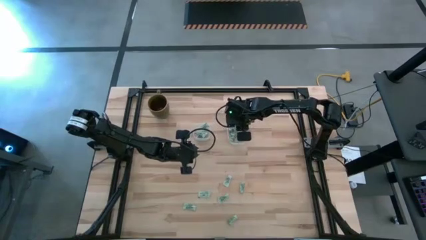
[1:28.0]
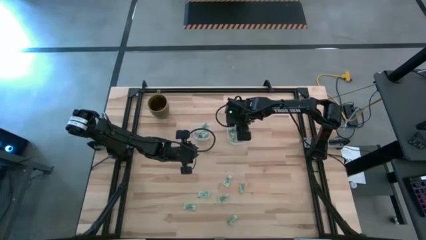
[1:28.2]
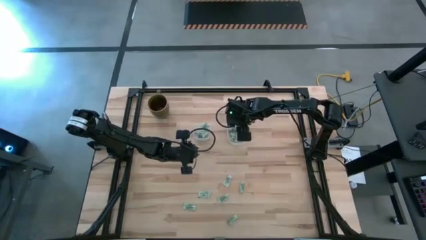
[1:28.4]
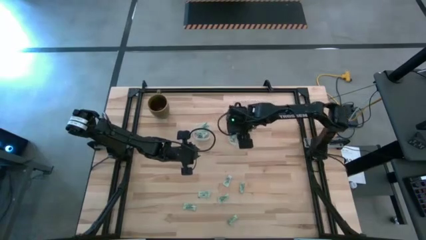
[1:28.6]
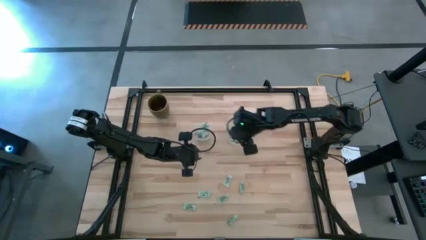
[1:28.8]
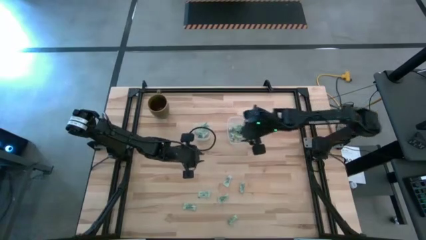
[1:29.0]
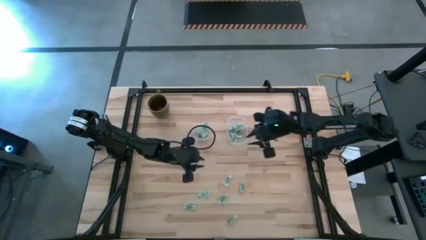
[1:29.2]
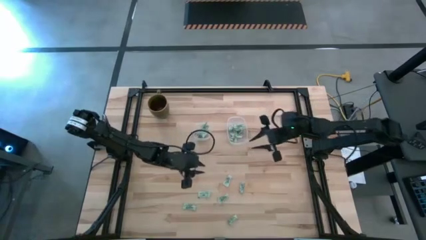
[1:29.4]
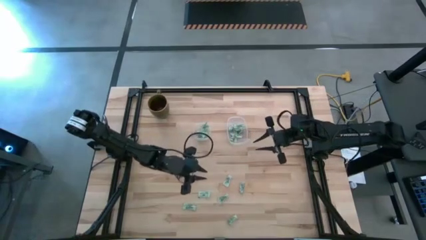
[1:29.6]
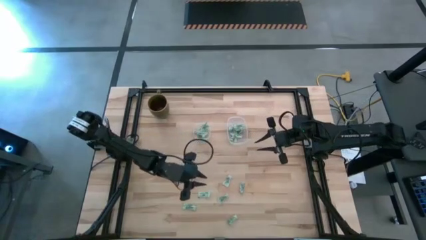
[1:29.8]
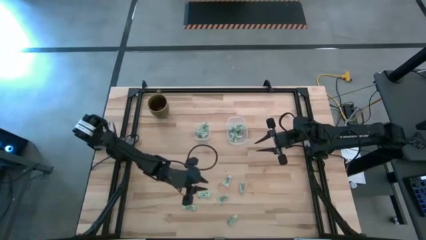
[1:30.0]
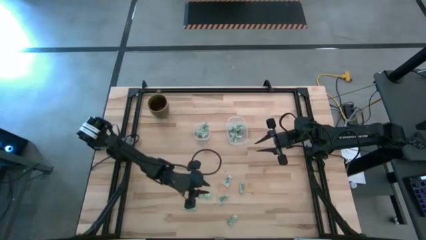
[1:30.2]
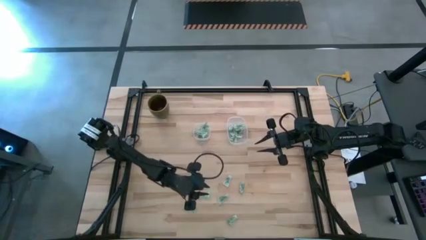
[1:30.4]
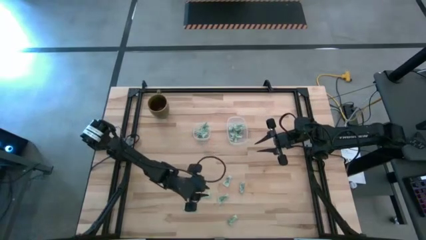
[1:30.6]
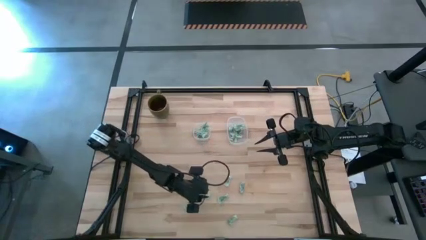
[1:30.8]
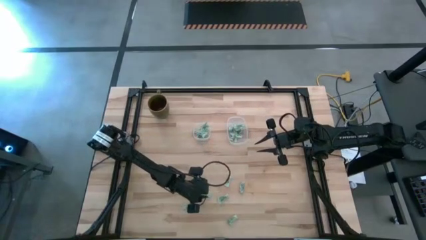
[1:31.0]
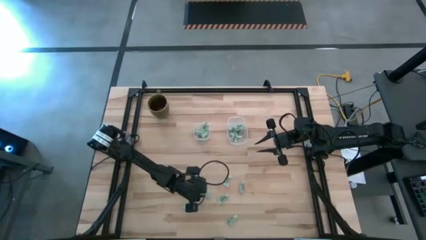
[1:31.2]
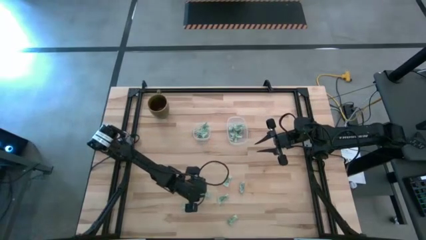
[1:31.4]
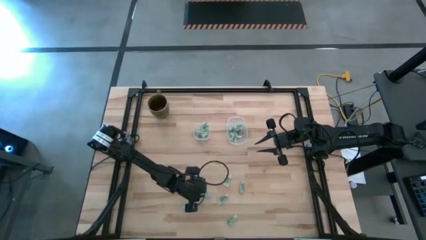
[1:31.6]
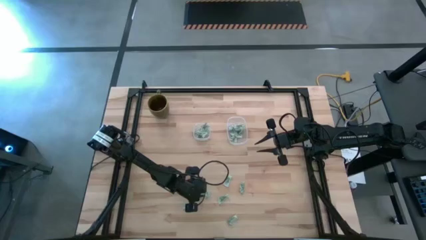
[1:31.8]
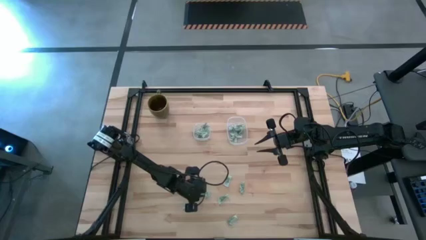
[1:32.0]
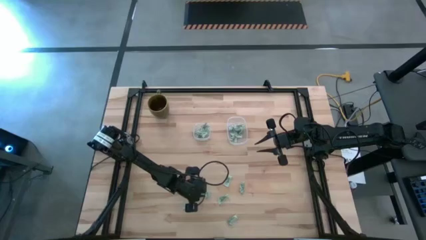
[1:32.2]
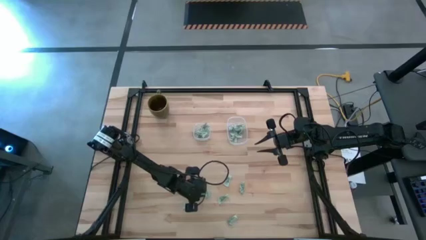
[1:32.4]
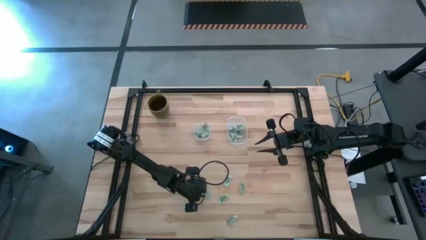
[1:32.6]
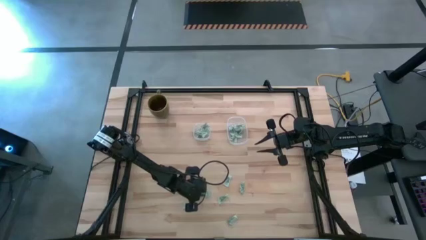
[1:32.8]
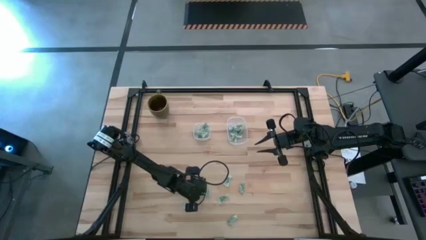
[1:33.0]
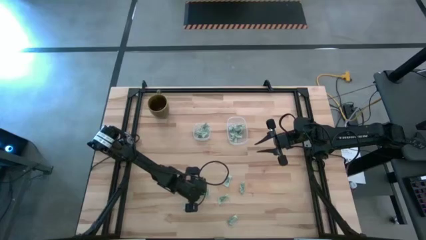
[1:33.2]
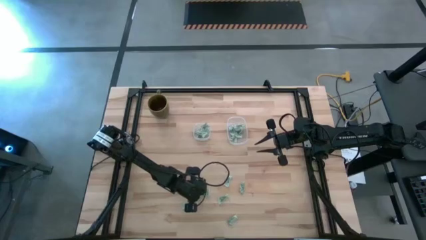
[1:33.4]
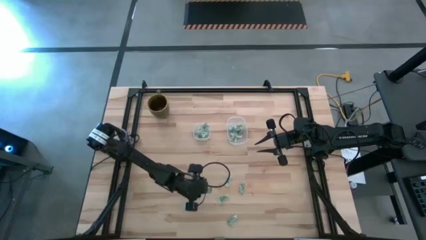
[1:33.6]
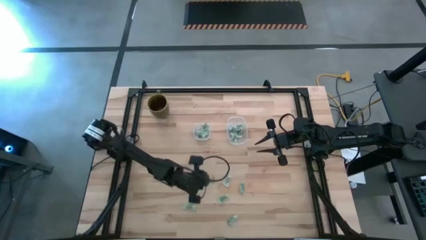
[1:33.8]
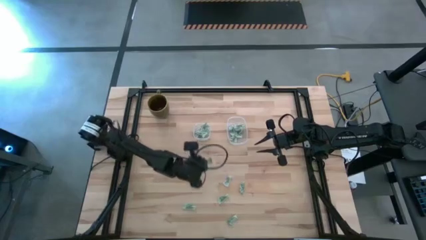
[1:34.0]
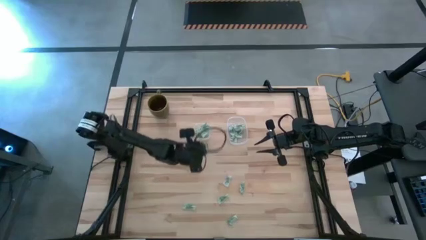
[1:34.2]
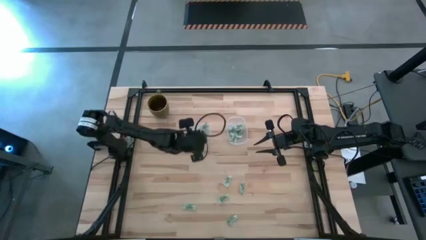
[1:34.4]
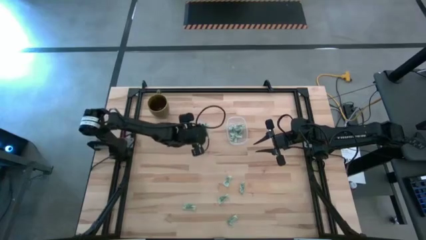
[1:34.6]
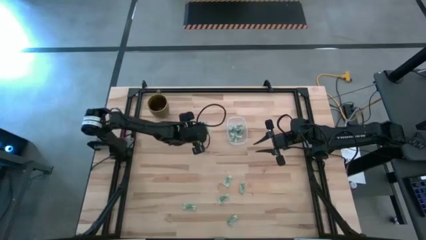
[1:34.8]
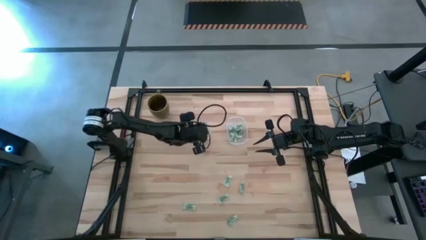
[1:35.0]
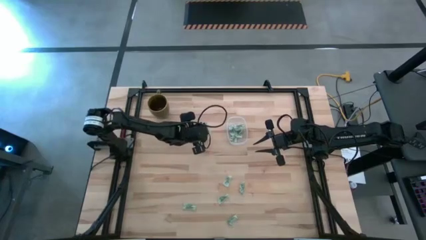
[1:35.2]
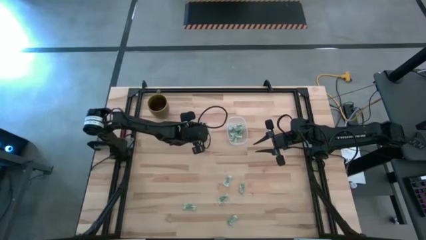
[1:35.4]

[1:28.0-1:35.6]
Task: Pick and place items into bin
Put the light green stevia packet into the left transparent bin

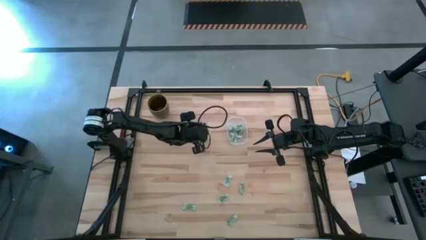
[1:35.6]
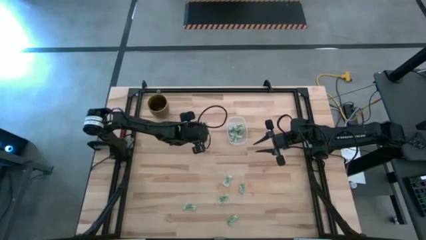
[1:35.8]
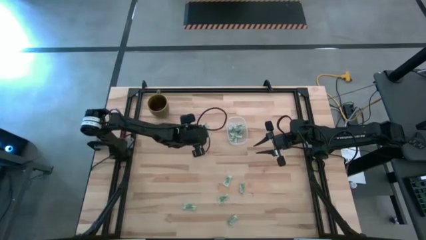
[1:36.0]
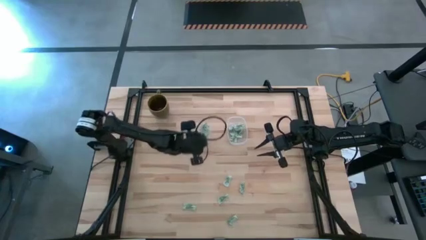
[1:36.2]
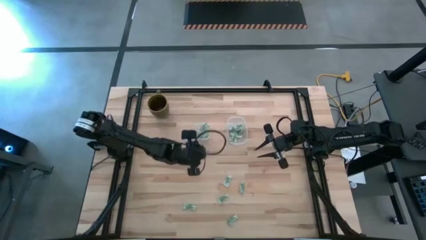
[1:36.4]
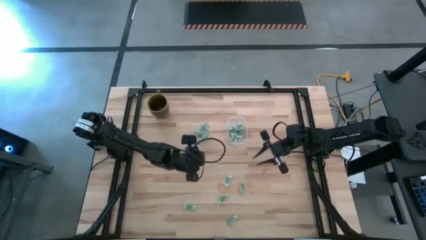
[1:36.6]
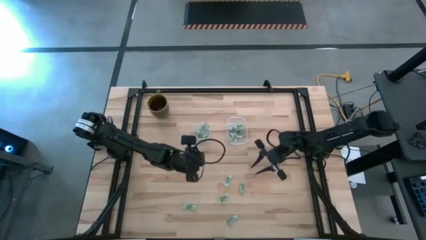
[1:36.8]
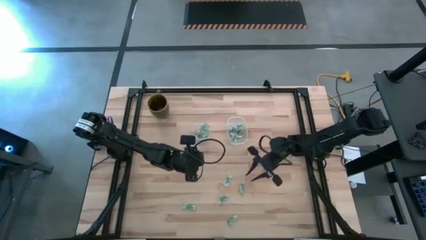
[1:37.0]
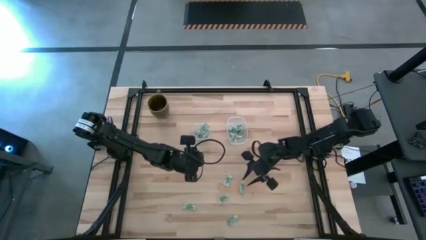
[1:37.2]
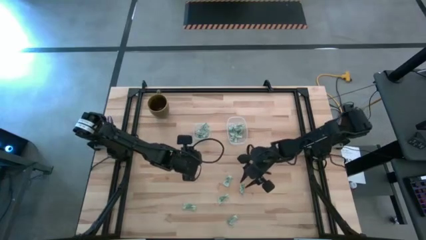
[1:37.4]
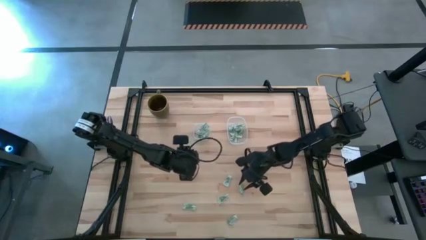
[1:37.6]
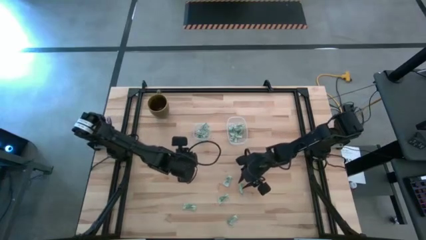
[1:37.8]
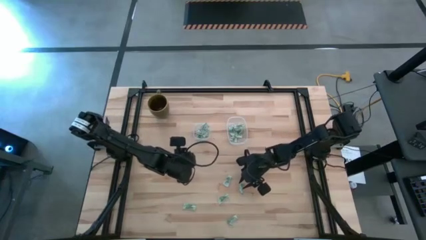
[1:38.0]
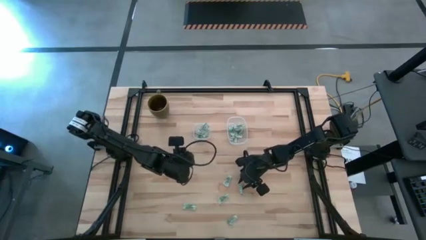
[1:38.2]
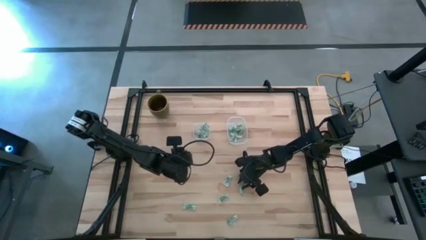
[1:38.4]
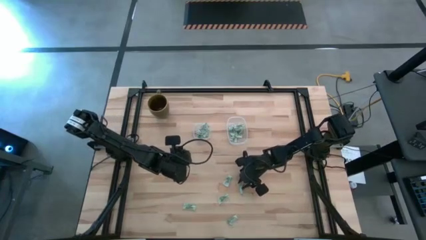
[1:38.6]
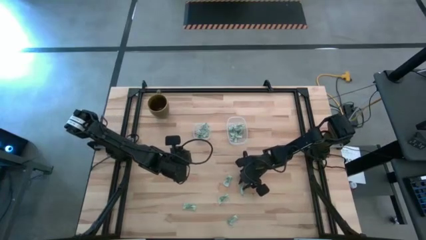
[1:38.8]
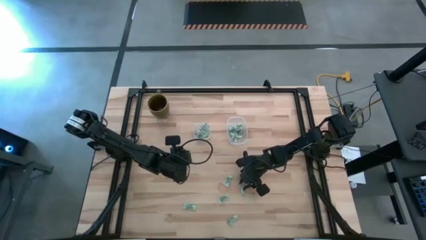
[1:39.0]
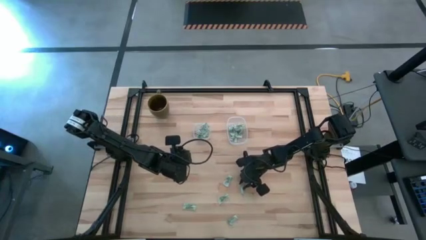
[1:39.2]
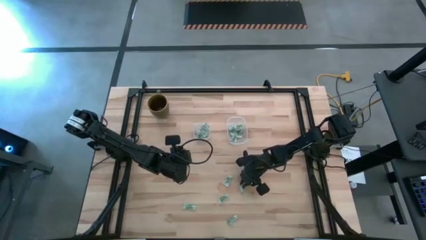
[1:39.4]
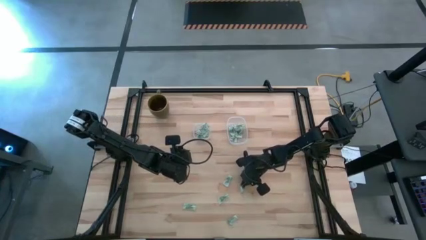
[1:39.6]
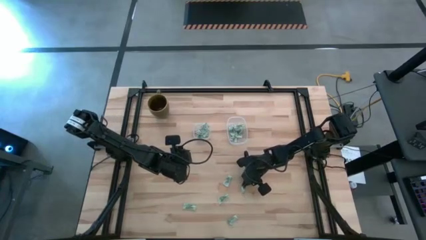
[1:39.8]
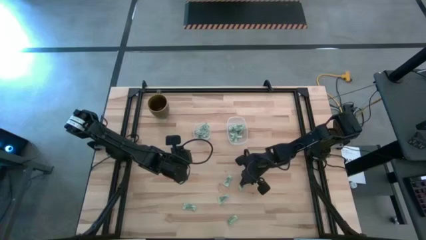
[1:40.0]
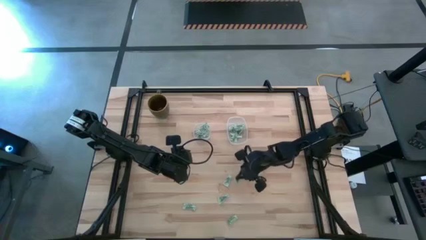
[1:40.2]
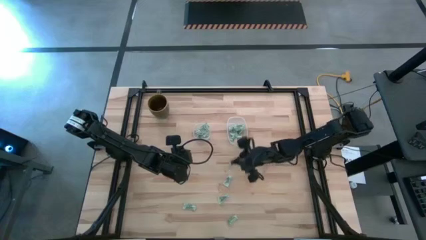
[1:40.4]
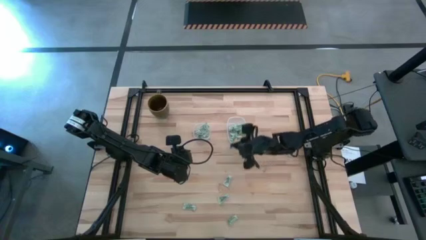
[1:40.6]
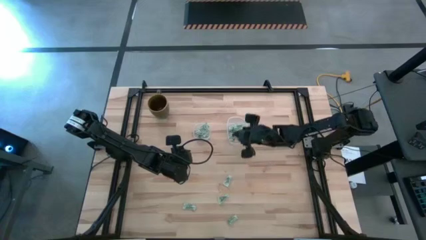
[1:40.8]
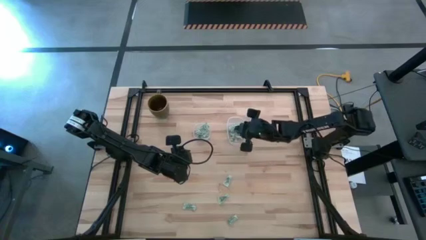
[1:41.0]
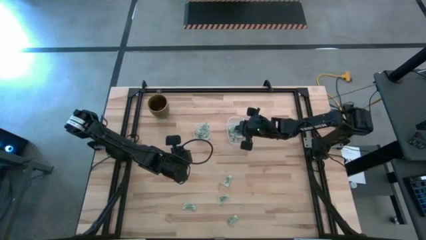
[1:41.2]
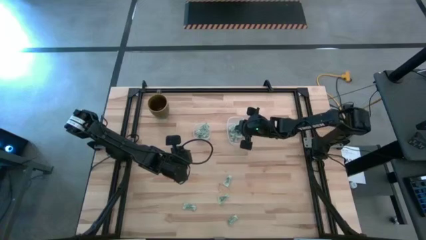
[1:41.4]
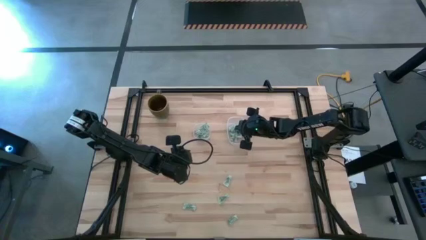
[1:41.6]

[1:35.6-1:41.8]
Put the light green stevia packet into the right transparent bin

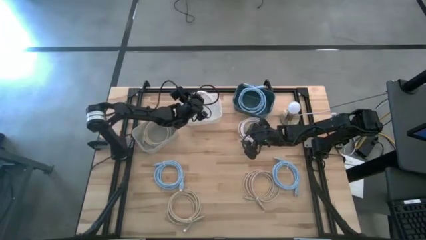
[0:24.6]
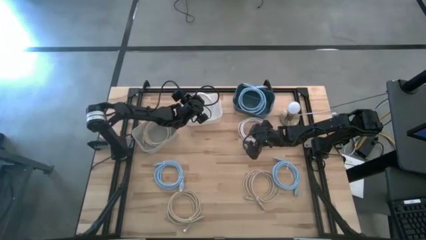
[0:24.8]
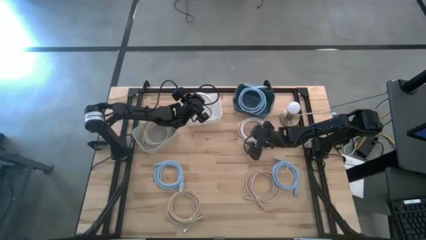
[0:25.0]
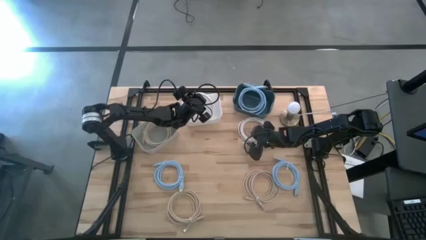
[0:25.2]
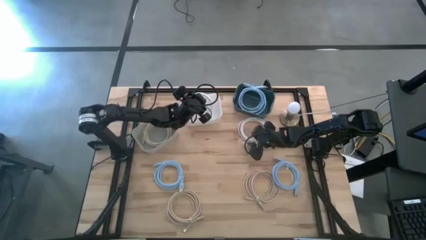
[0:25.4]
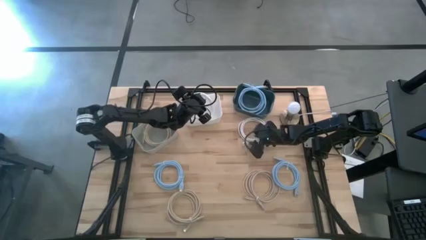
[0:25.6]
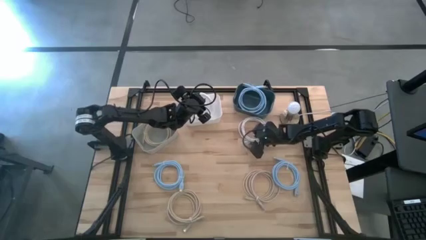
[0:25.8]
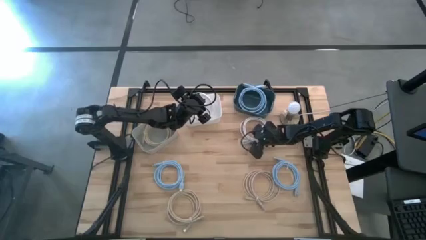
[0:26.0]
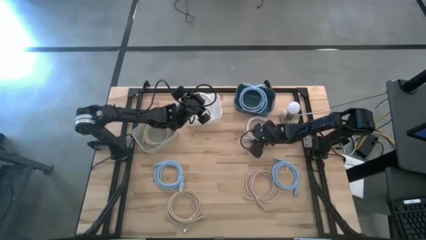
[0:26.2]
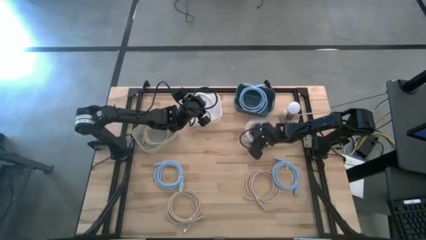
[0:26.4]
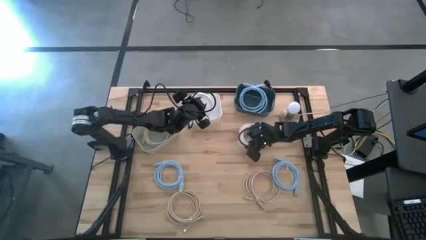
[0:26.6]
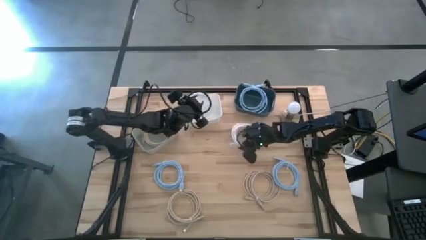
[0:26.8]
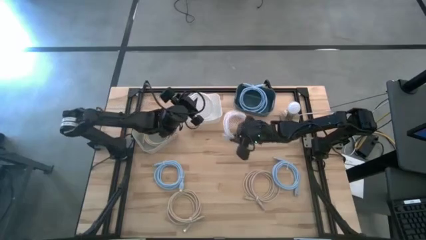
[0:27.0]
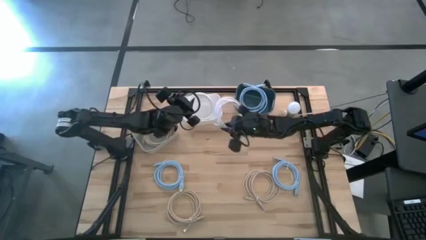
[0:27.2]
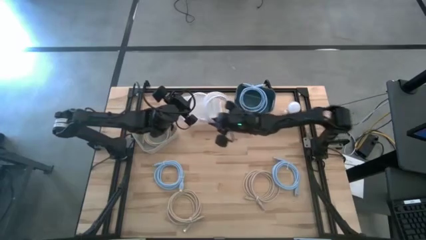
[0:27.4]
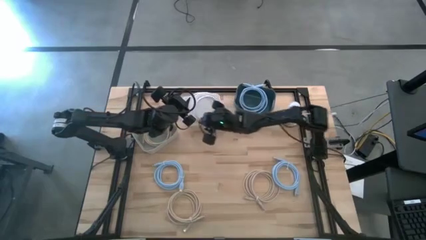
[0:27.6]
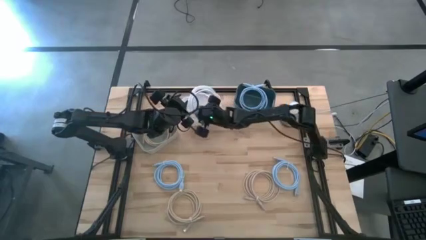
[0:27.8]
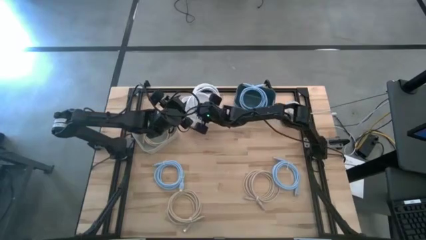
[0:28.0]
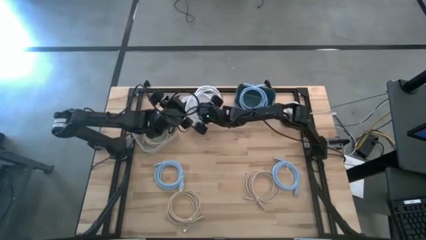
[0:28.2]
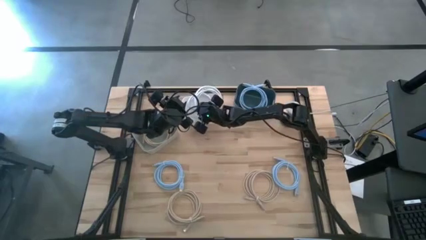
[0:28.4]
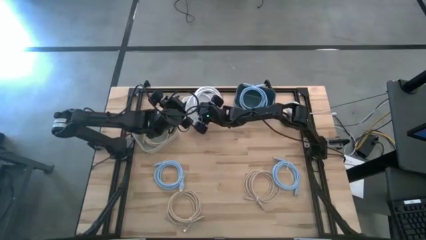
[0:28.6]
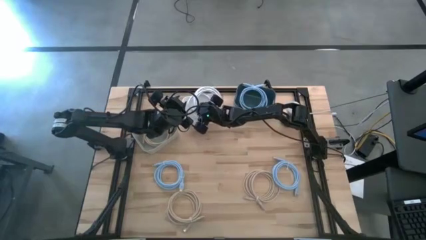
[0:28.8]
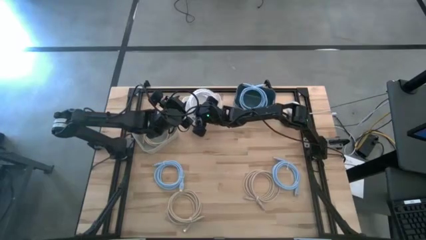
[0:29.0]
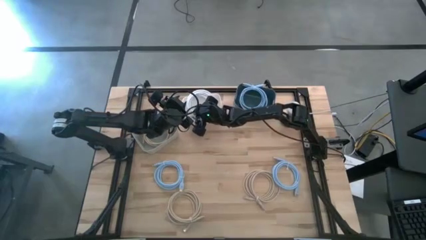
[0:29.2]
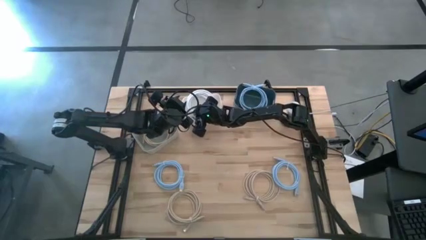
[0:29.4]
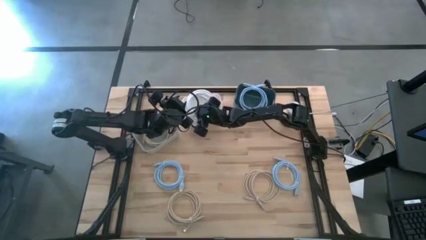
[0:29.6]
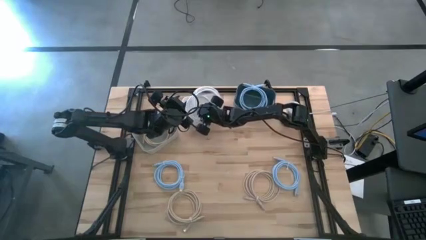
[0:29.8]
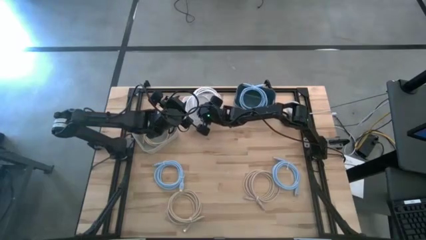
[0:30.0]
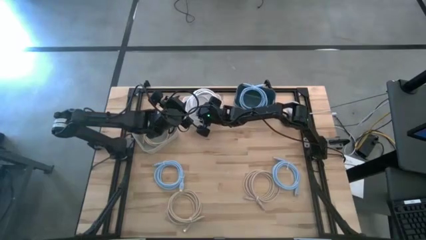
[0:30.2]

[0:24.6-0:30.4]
Task: Pick & Place USB Port
Put the white charger cable into the white bin
